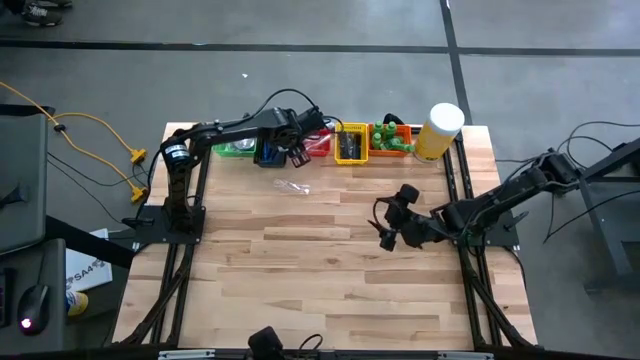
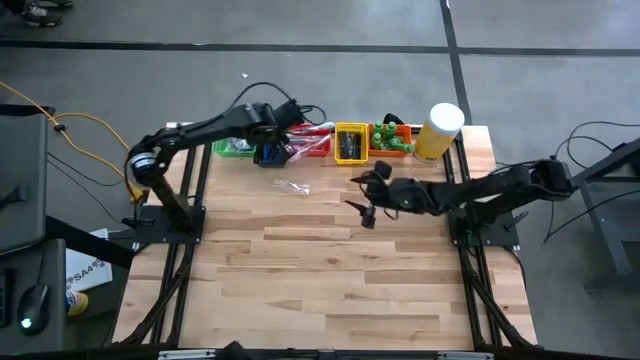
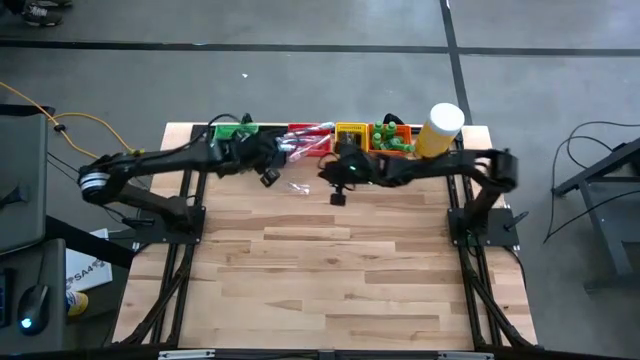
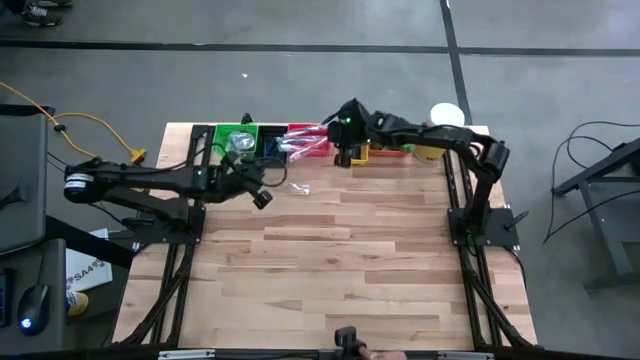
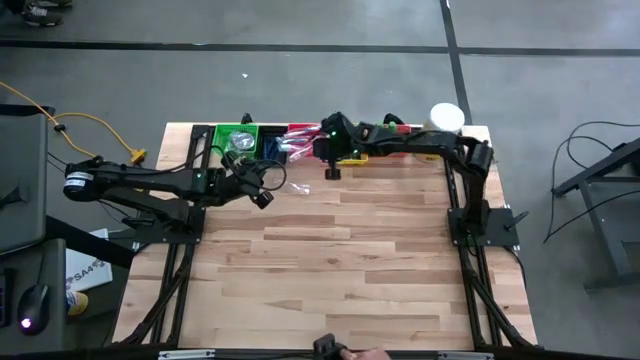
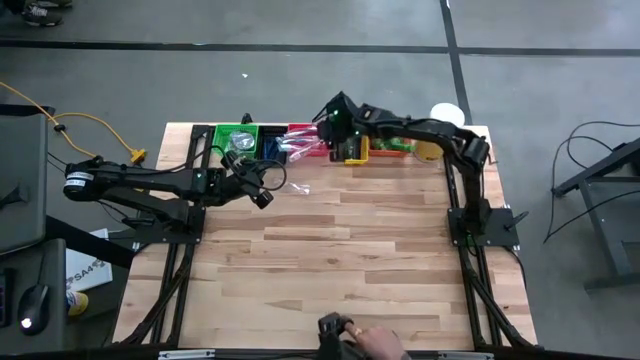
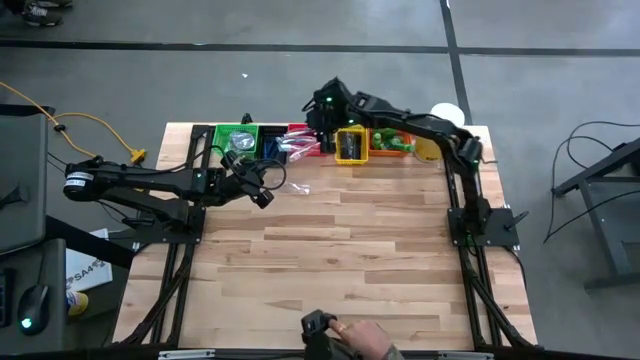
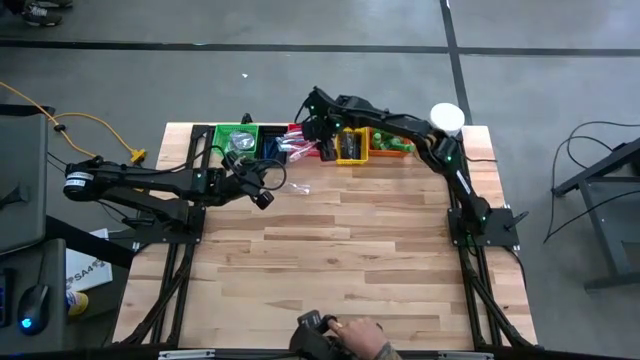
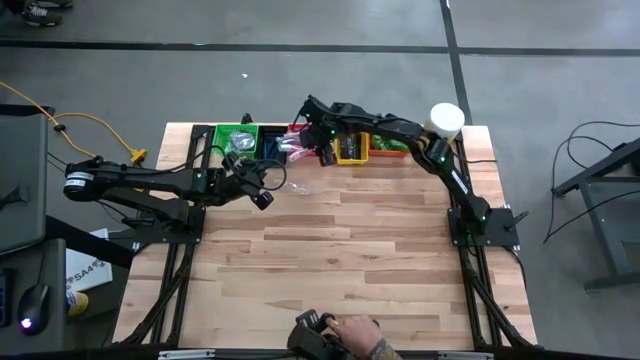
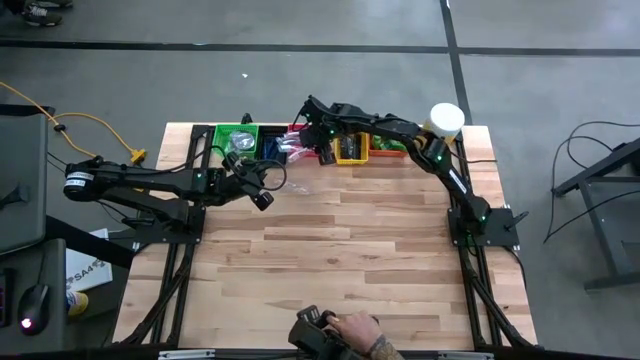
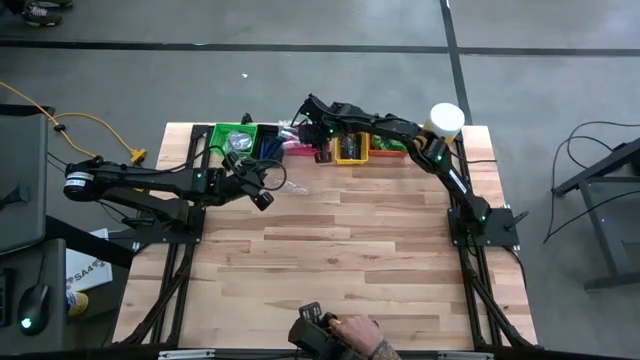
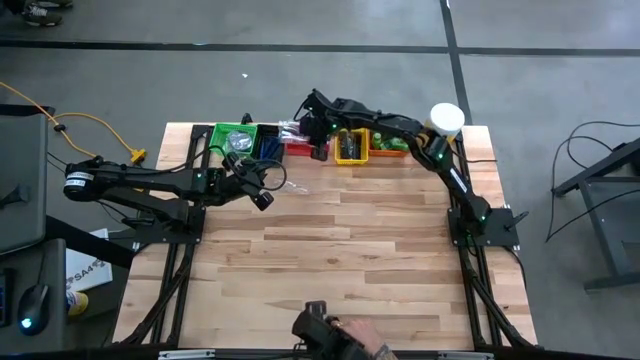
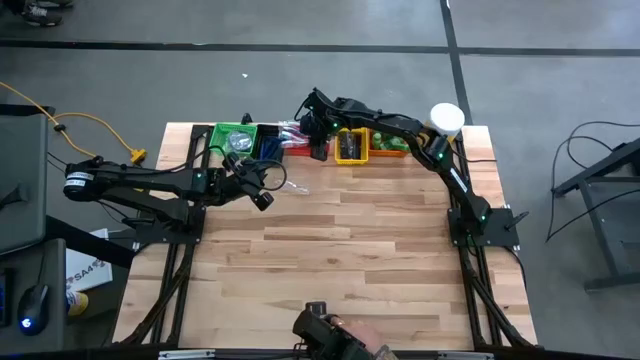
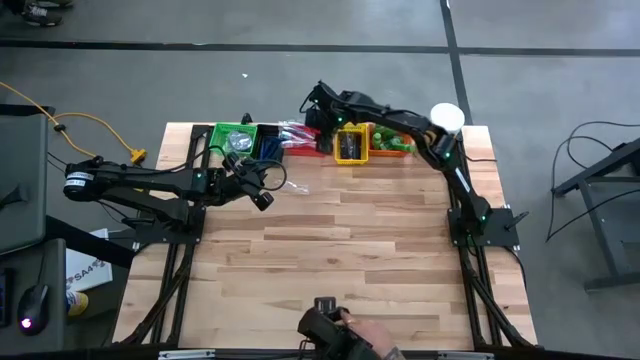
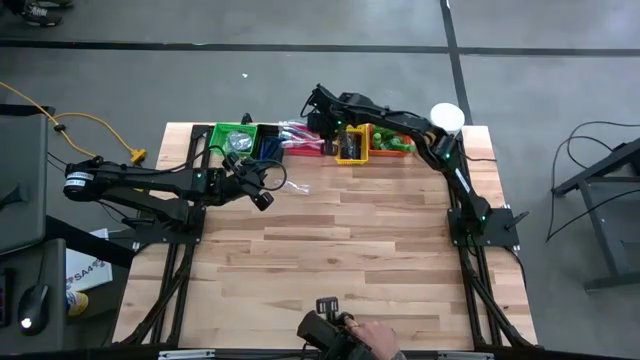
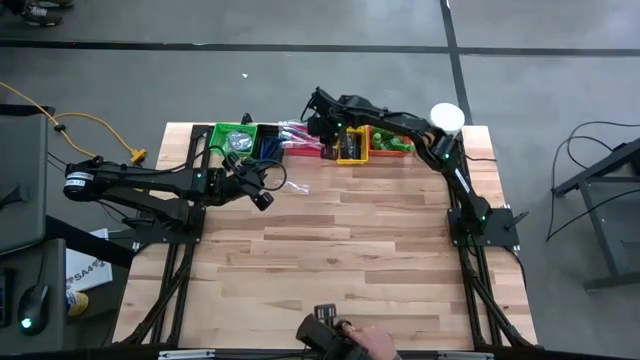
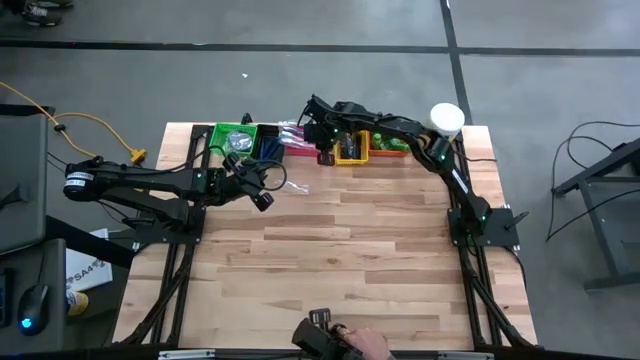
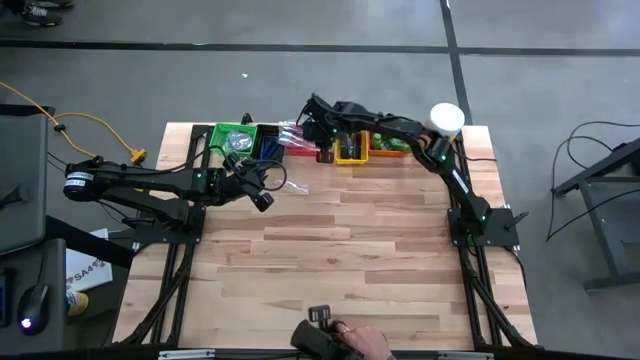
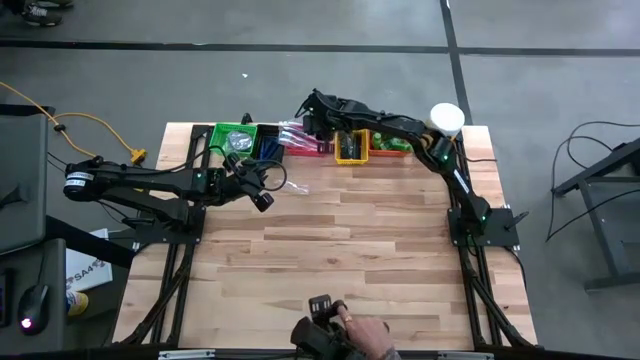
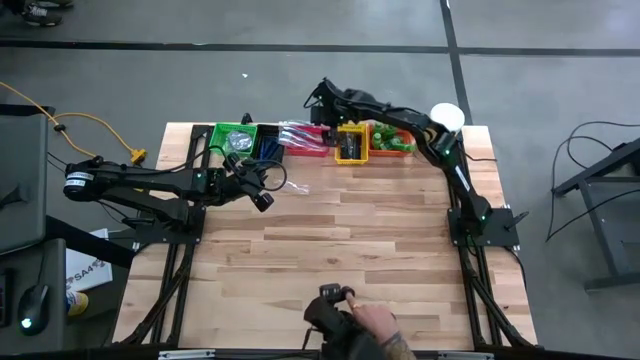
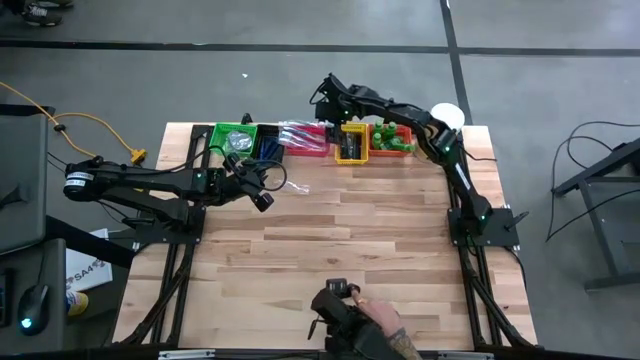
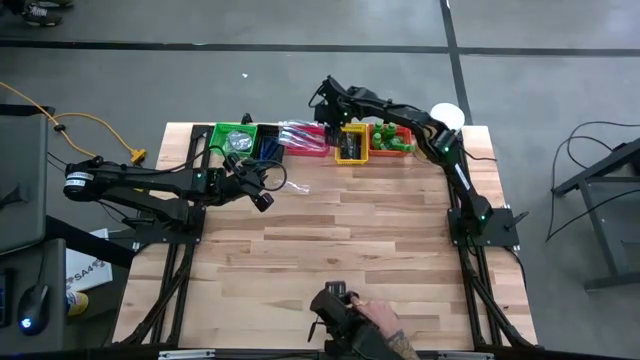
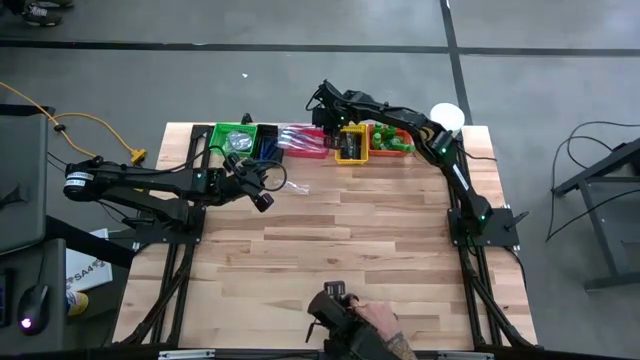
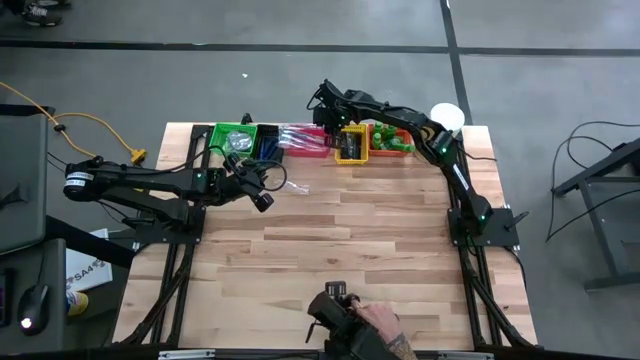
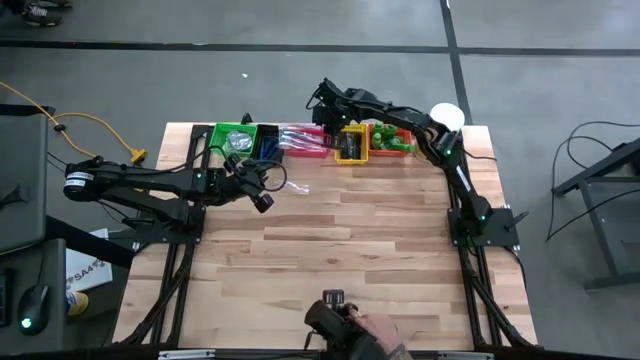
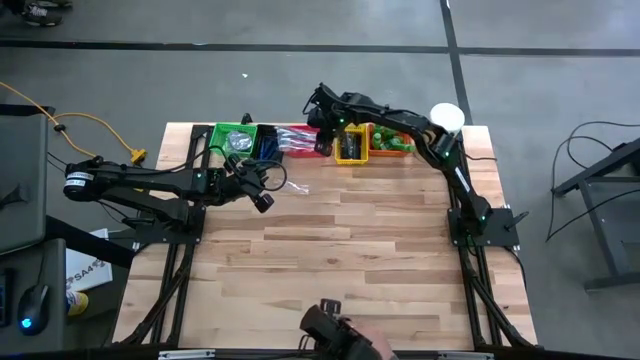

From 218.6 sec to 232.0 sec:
Task: Pick & Place Travel size toiletries
Adjust the toothbrushes in the red basket

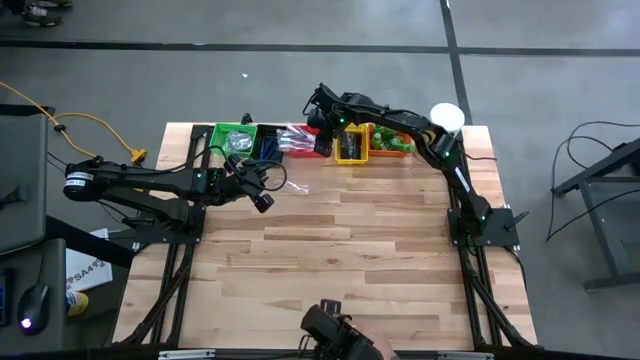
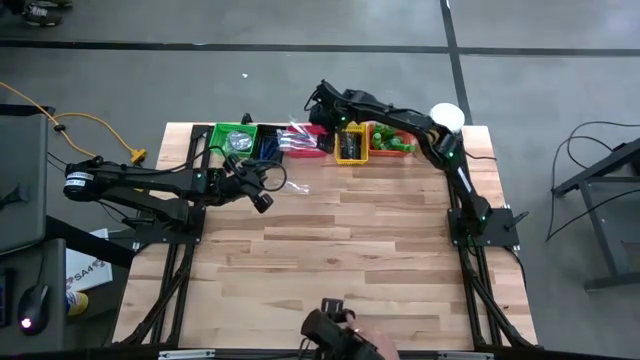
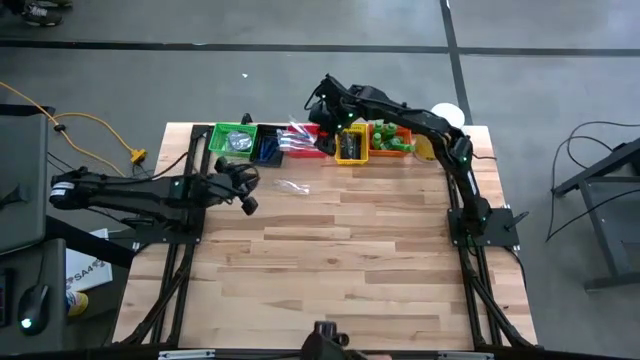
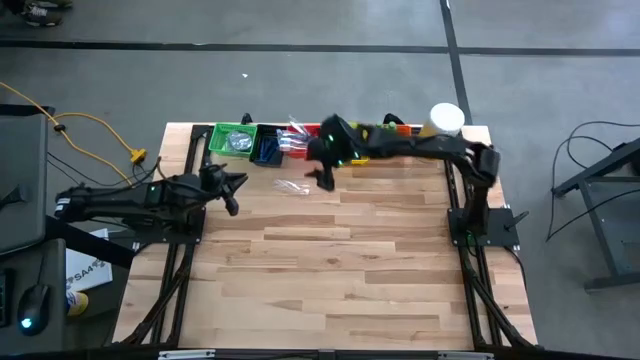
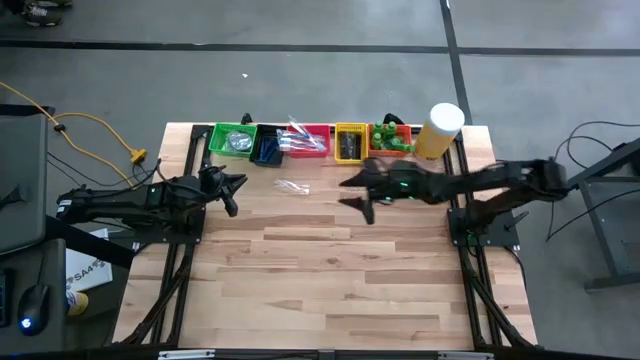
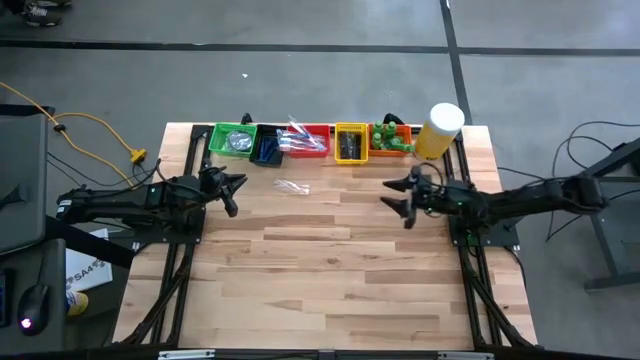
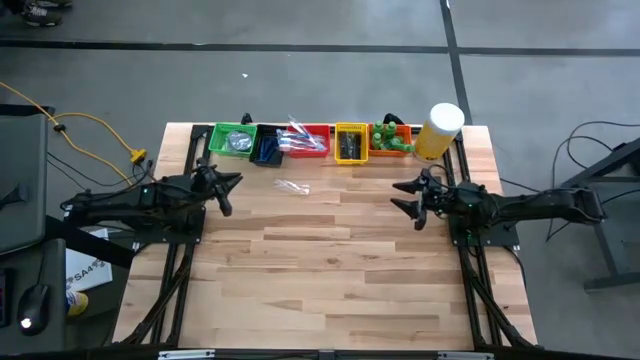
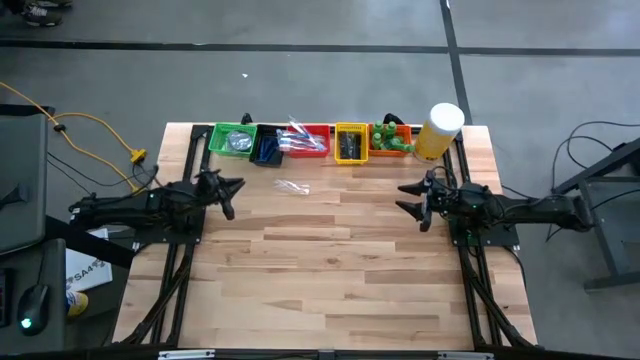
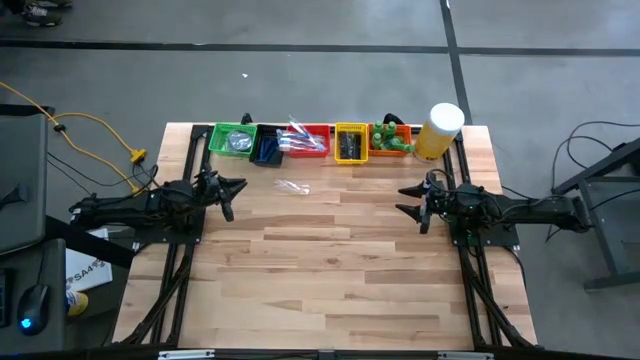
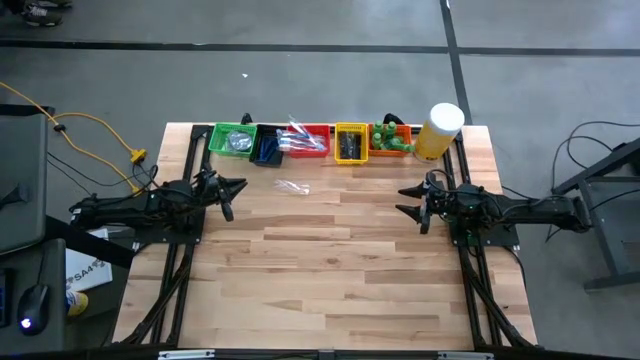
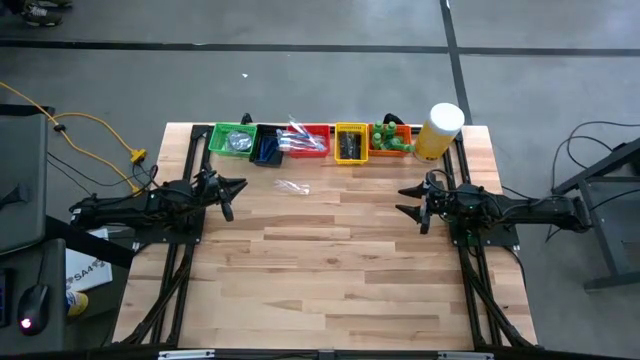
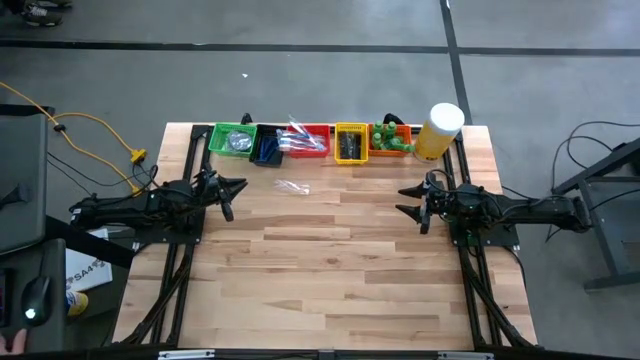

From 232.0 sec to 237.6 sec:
Return To Home Position

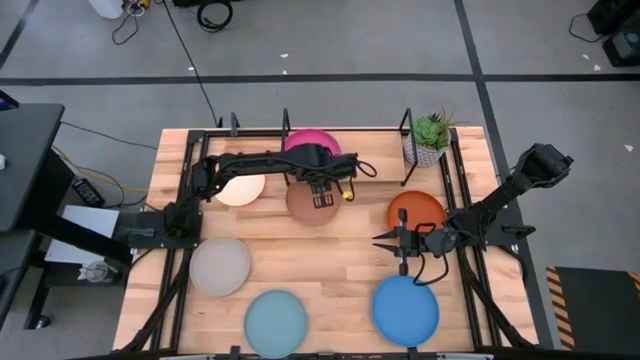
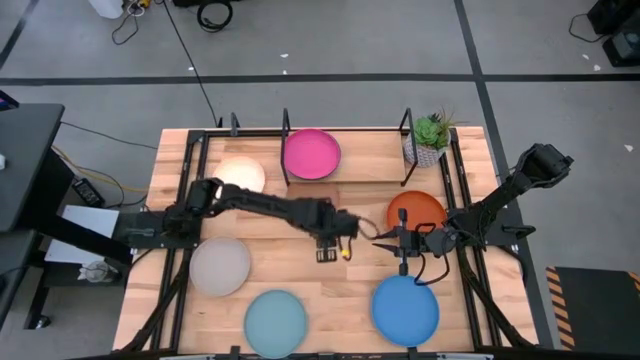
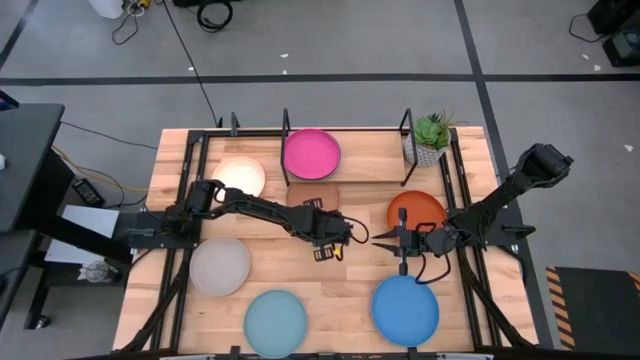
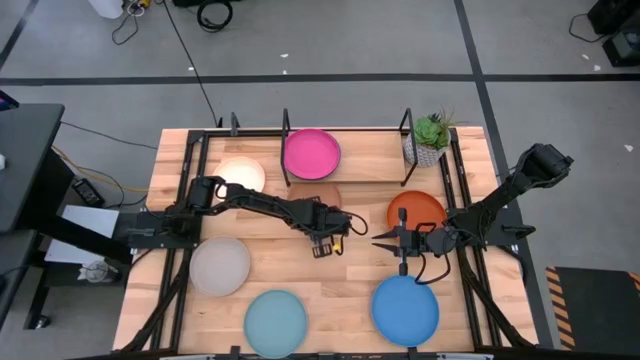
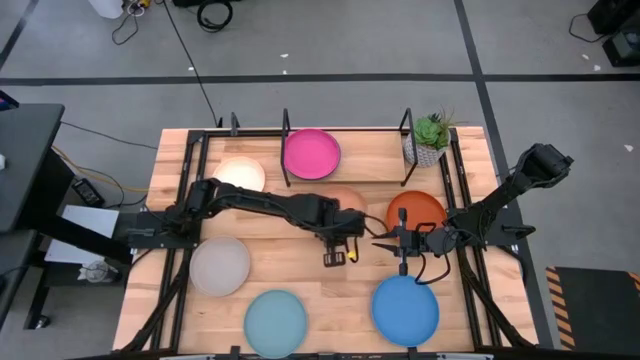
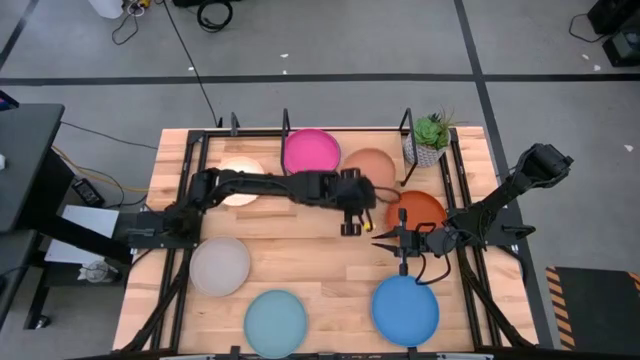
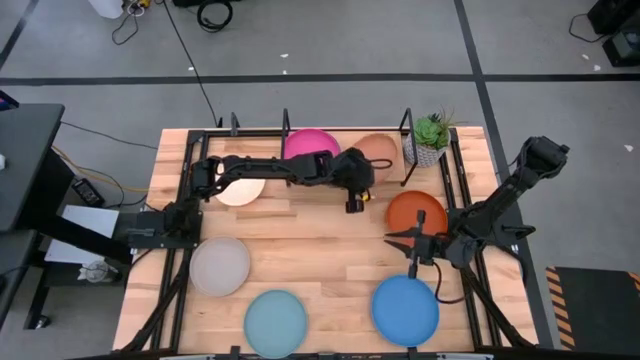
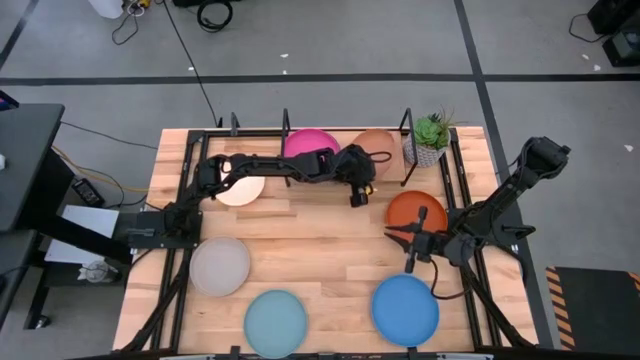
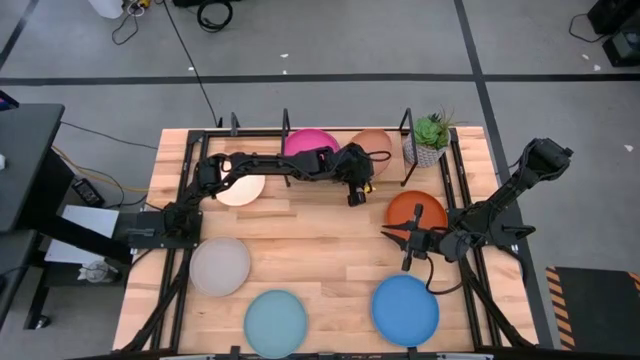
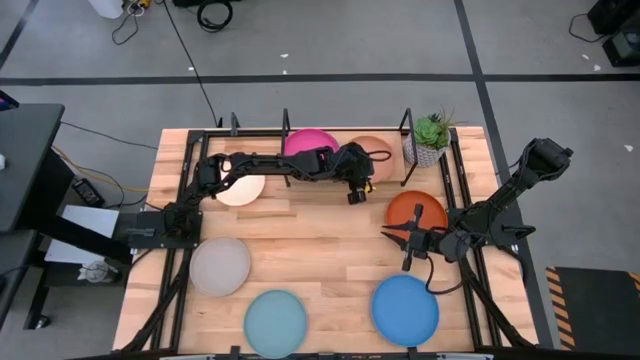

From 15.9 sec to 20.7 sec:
Task: Place and stack plates onto a shelf
Put the brown plate on the shelf
